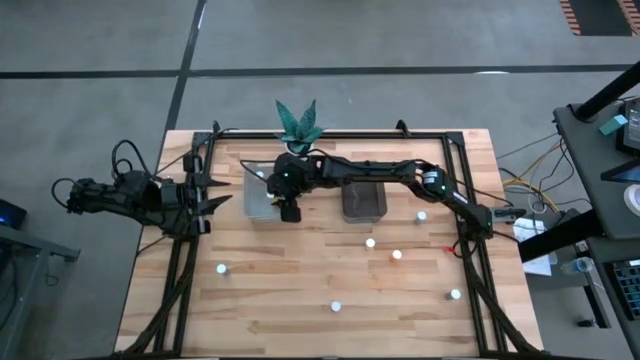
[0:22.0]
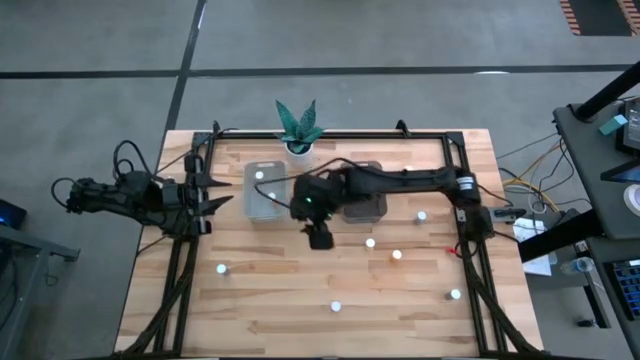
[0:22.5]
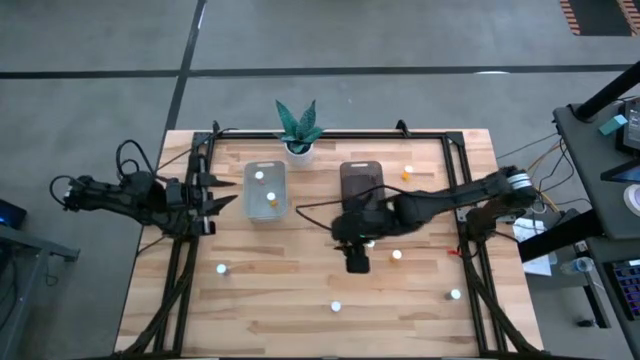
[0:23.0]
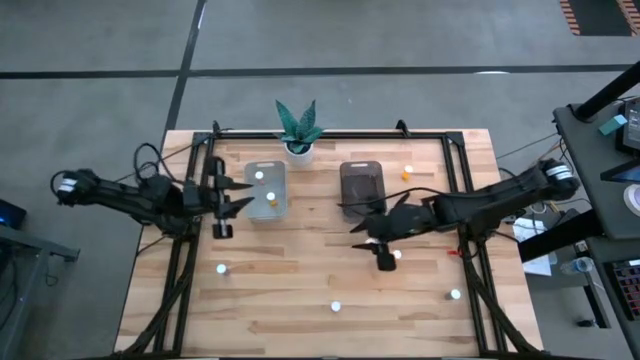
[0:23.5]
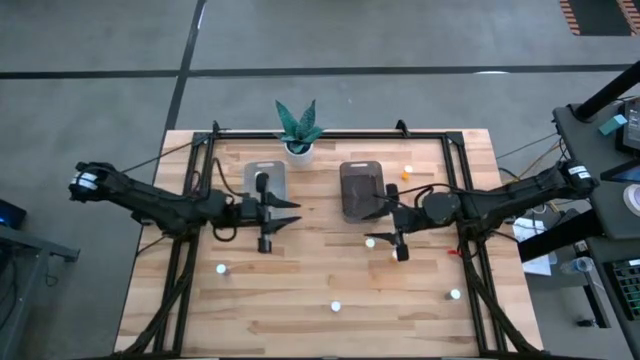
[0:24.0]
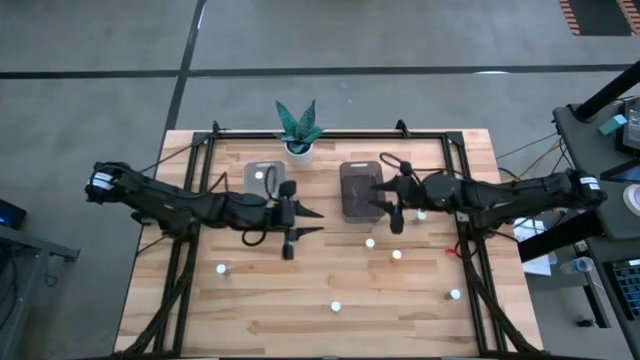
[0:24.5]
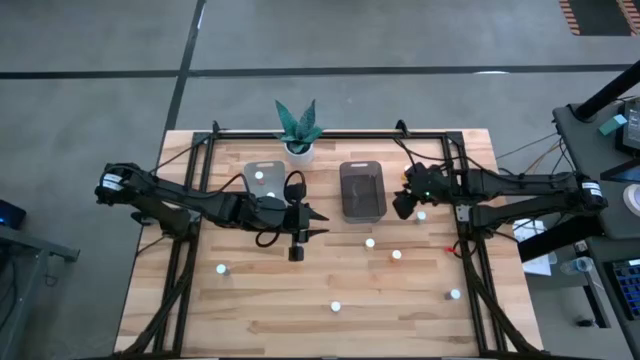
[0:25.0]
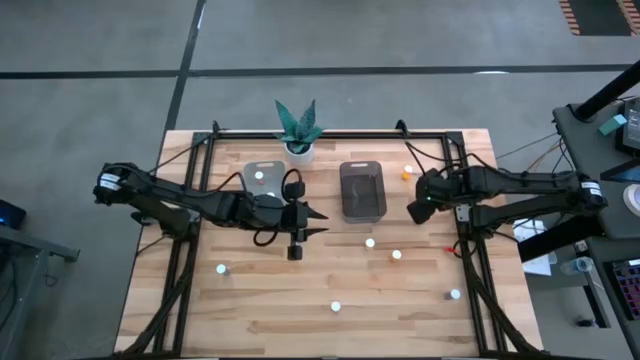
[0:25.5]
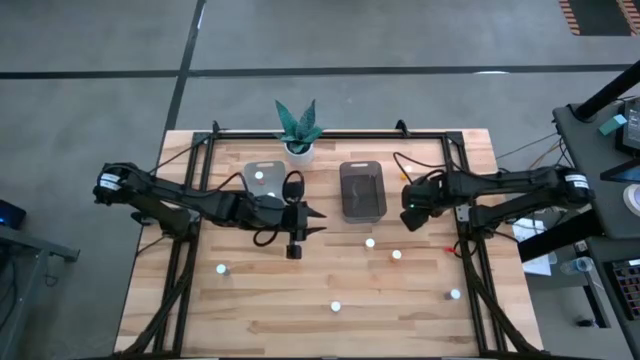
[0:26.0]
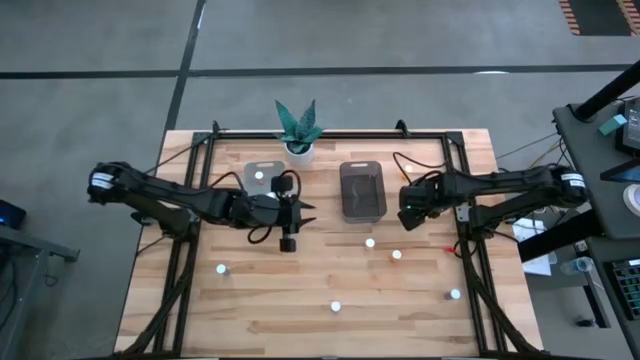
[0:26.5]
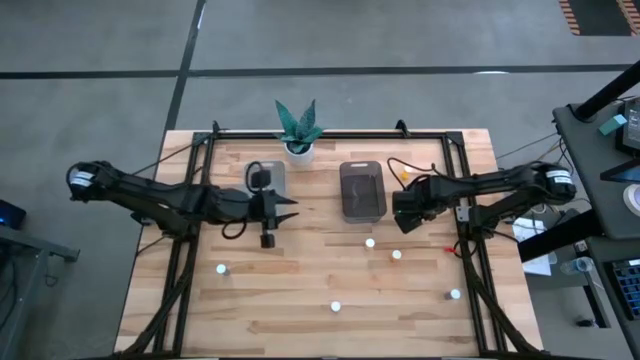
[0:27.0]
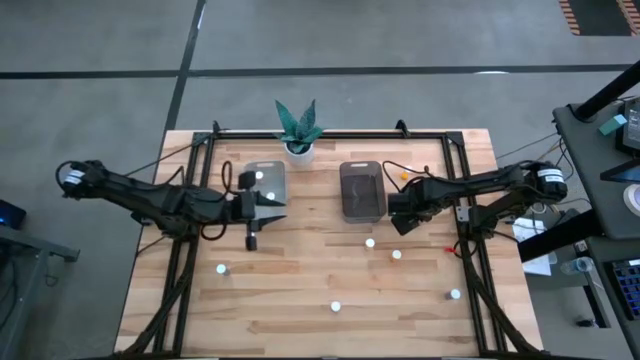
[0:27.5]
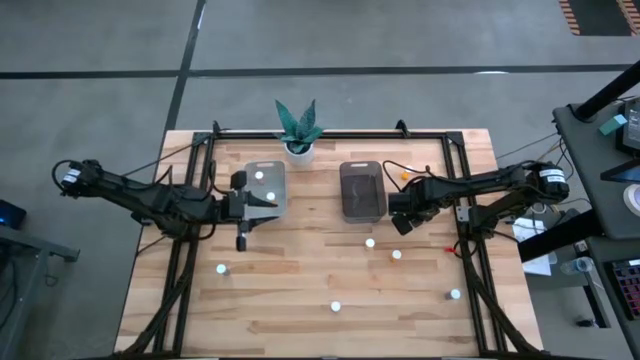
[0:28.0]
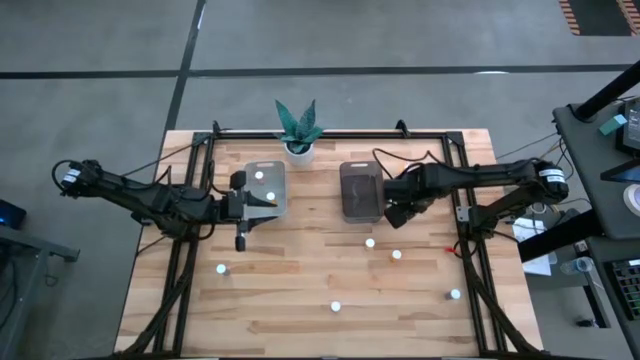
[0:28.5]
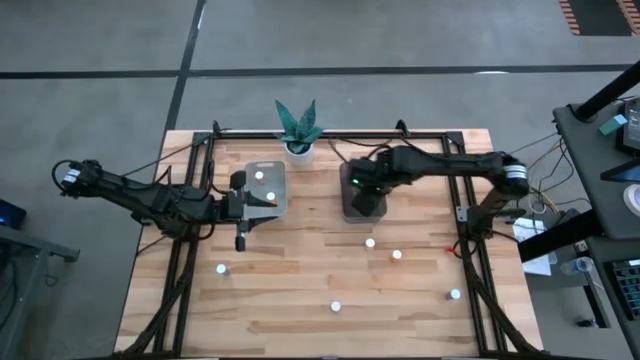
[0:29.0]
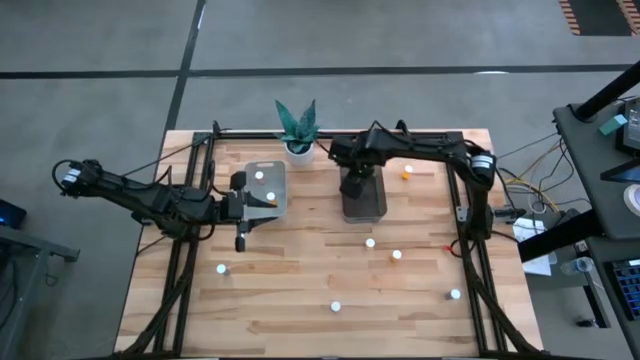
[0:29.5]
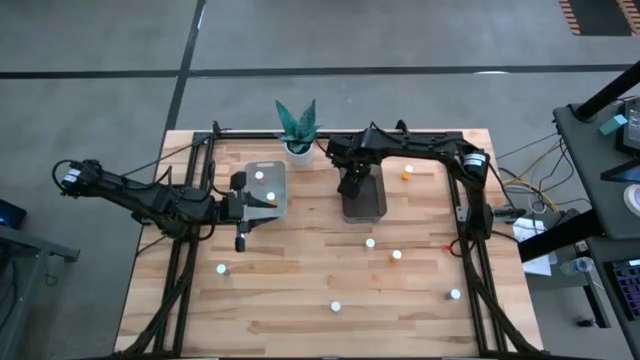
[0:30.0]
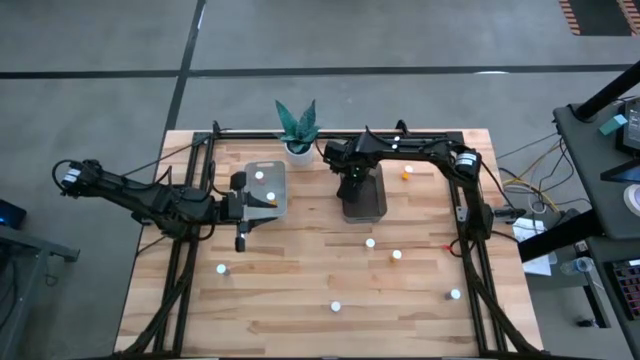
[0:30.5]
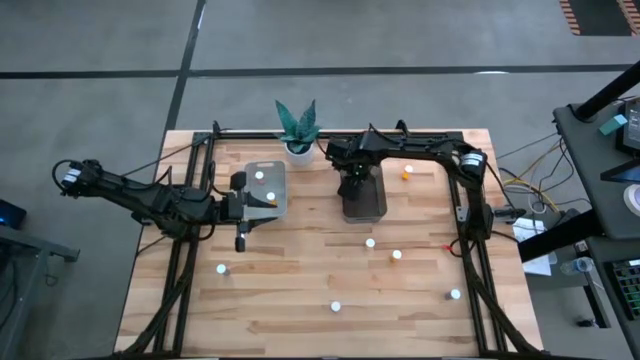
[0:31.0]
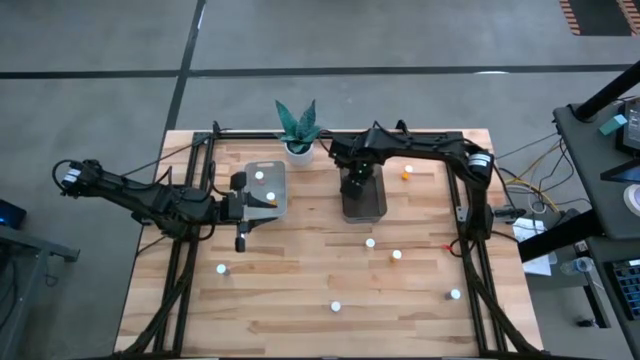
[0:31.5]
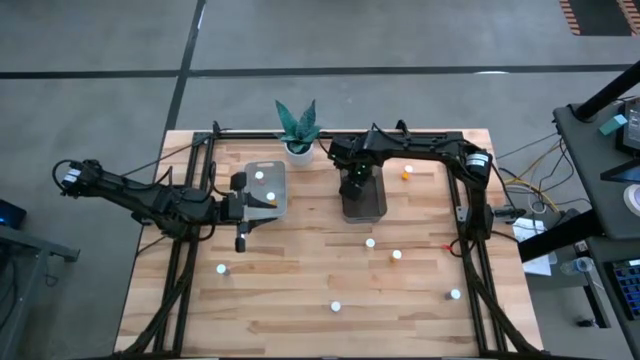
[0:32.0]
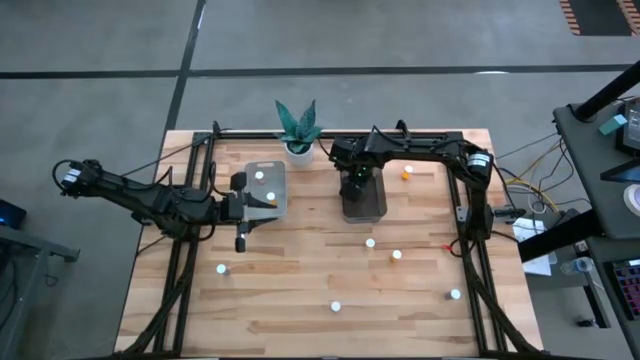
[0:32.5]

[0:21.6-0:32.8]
Task: Pick and place medicine bottles into bin by pill shape (circle, oval)
Put the top blue capsule bottle into the black bin

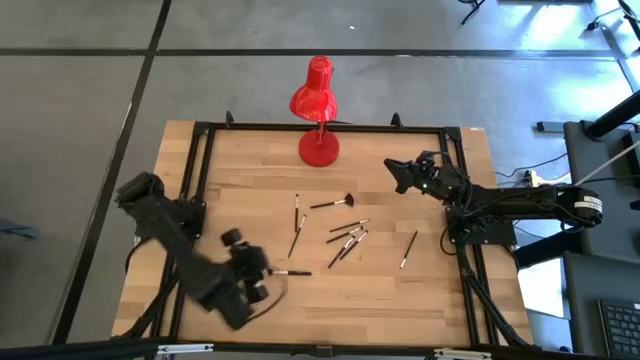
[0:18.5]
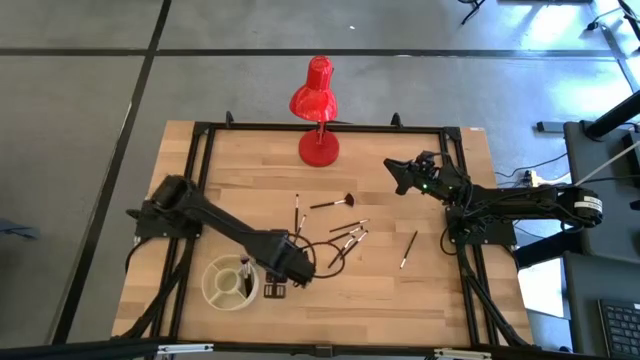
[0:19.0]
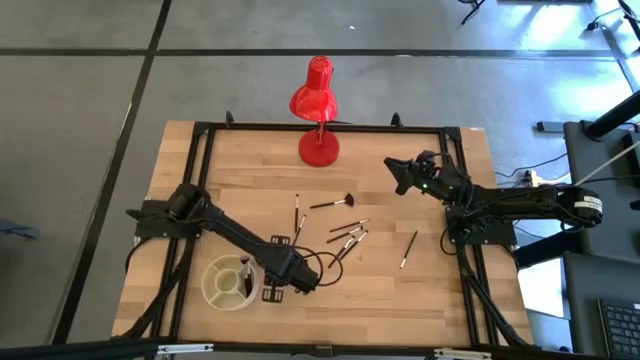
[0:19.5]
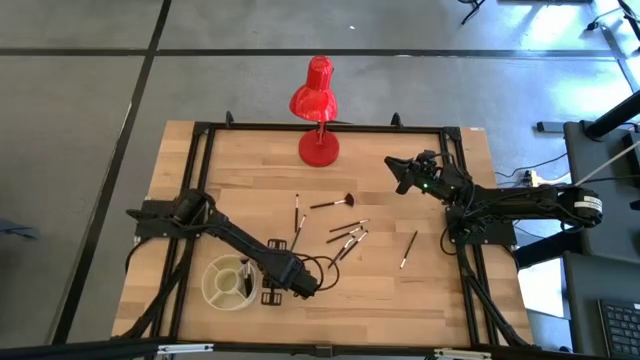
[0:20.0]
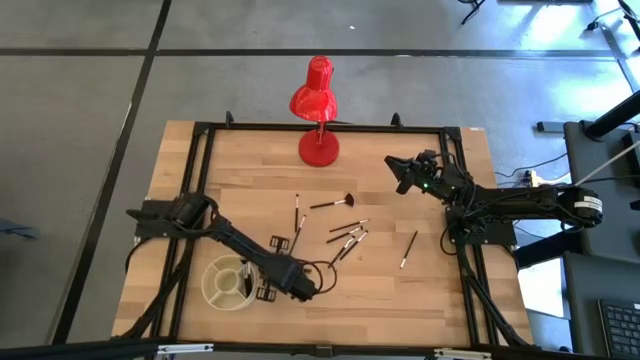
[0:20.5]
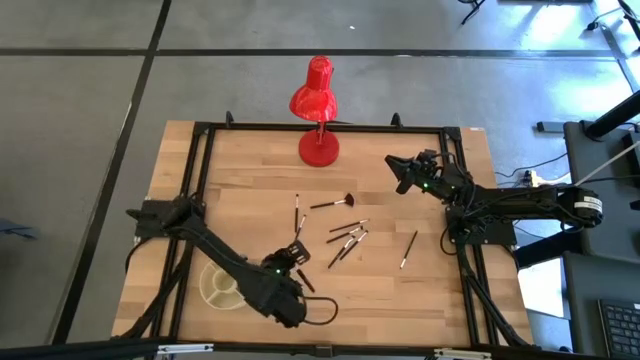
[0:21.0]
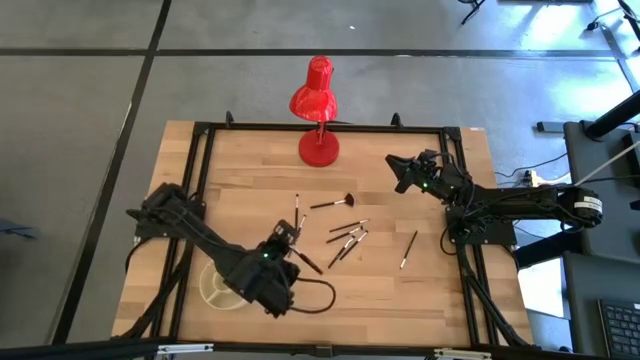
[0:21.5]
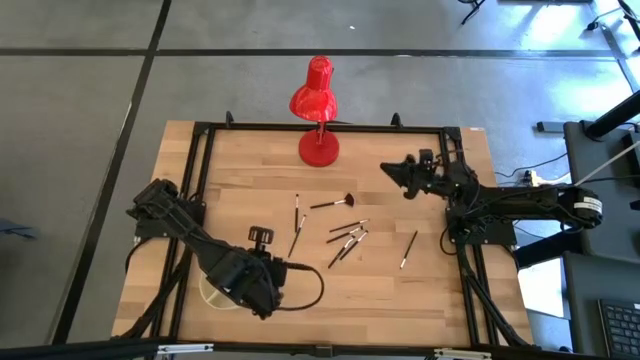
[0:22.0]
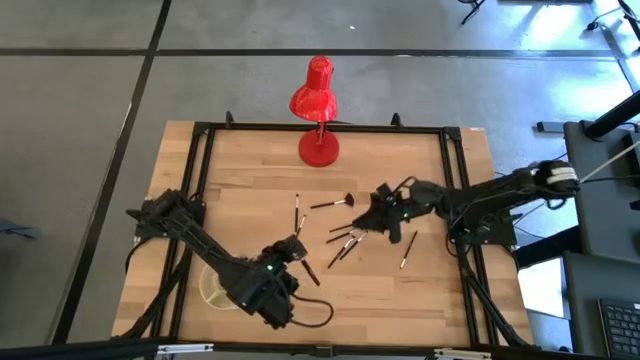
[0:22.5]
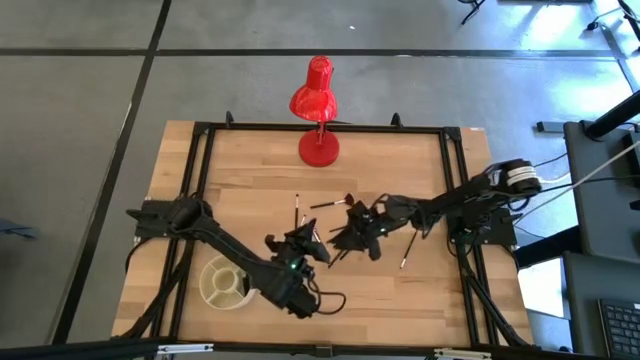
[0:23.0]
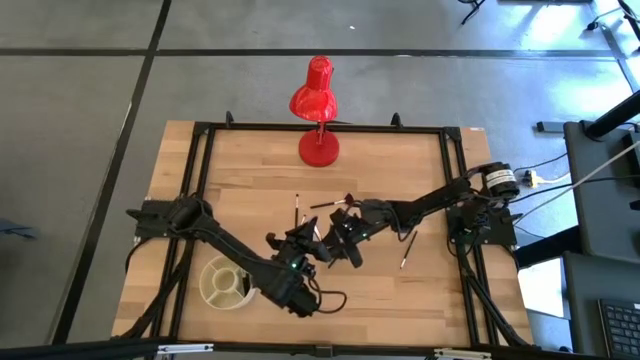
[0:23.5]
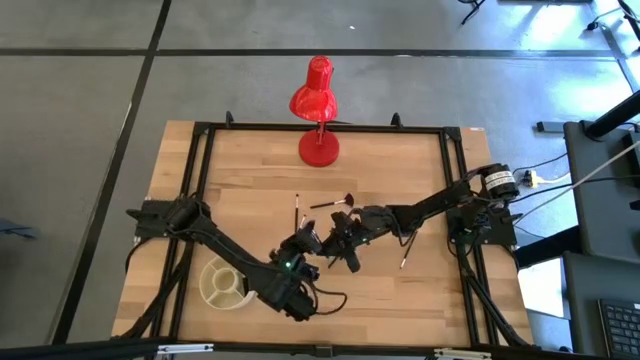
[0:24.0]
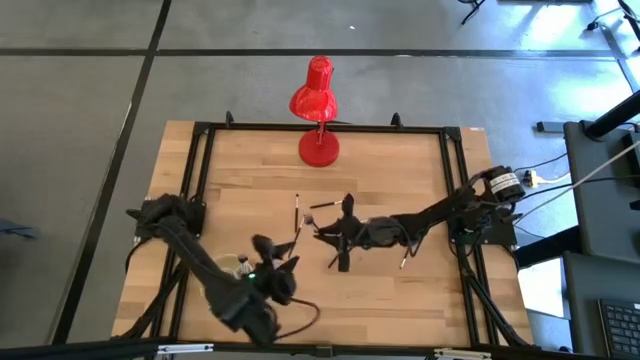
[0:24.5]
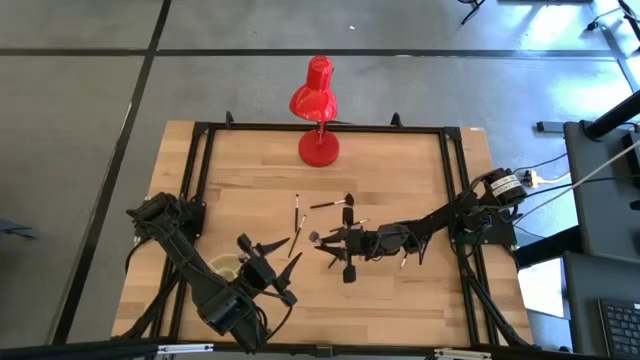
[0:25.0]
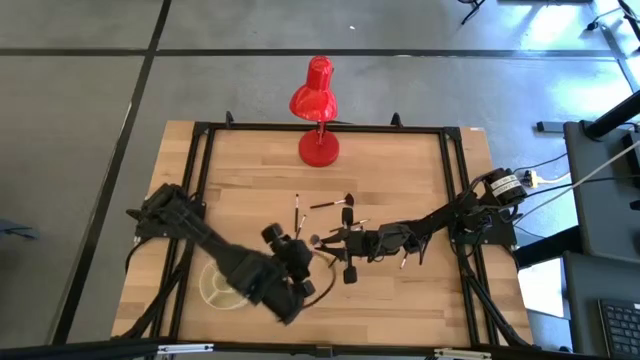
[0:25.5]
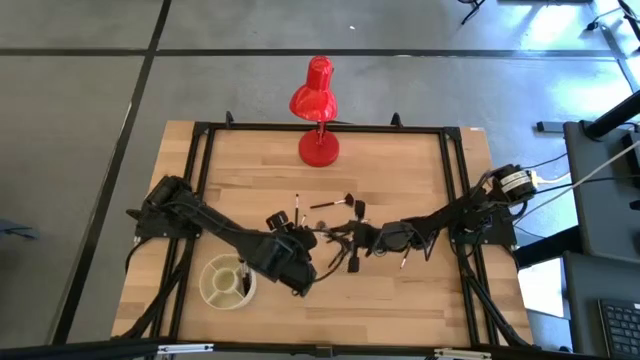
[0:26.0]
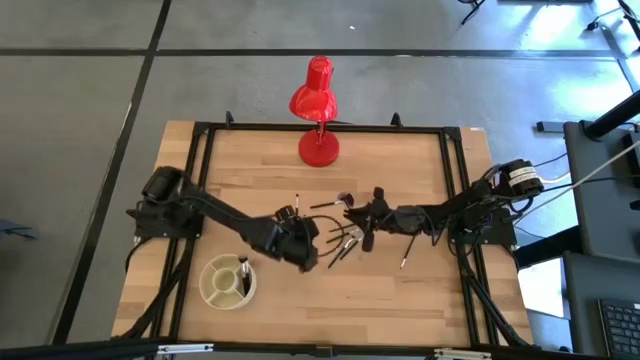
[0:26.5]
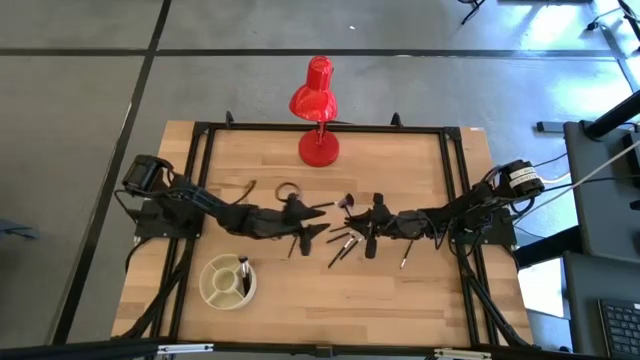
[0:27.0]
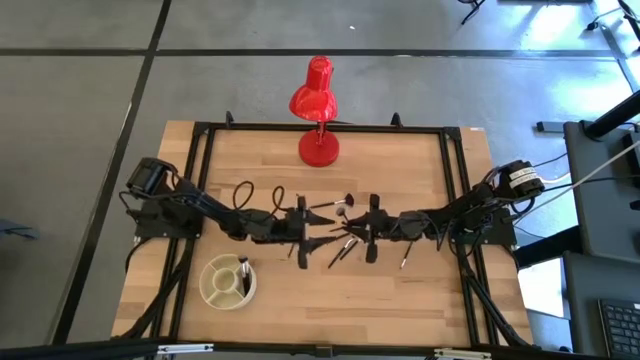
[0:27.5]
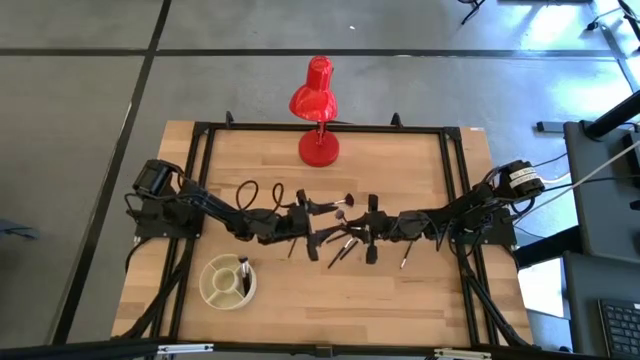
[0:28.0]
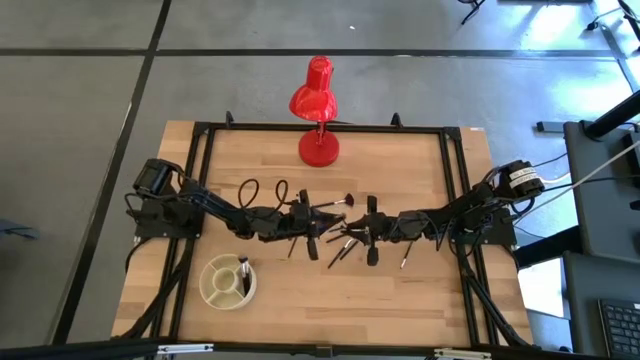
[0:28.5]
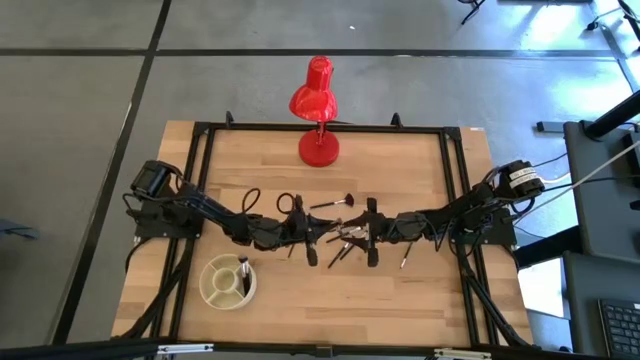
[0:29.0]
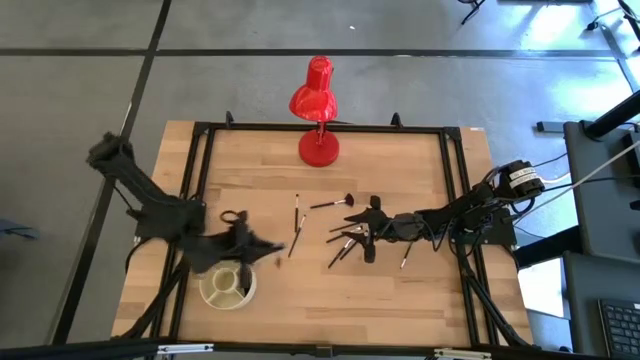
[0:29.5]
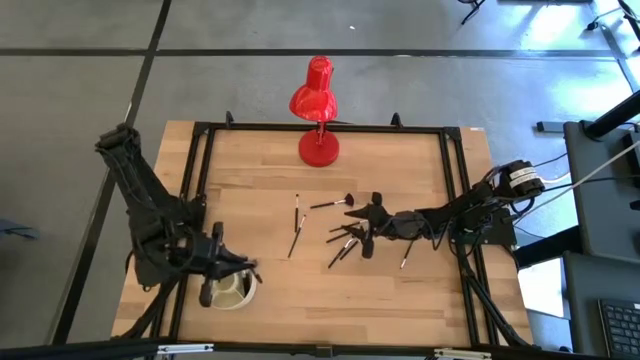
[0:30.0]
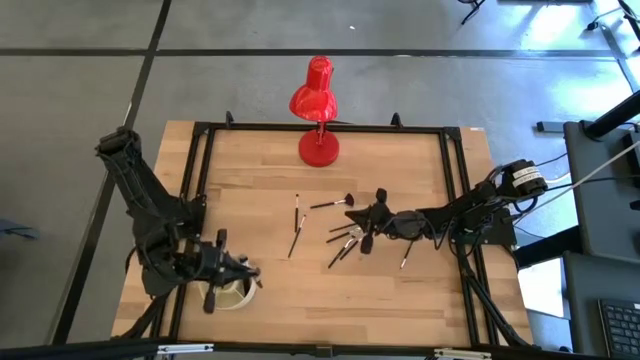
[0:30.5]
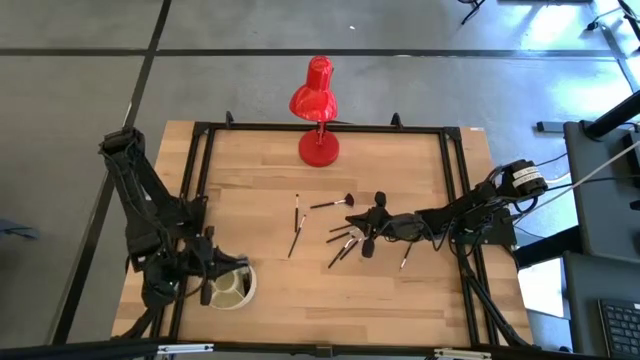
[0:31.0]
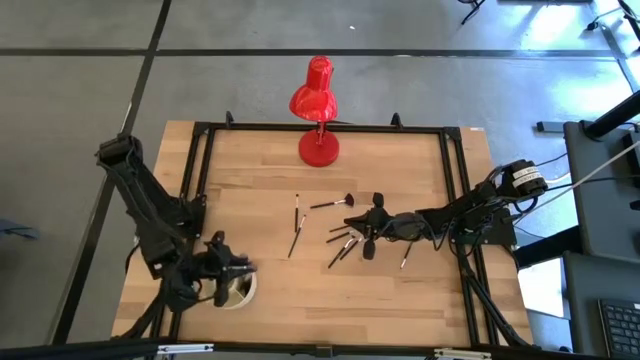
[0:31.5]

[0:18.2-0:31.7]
Task: Put items in baskets/containers
Put the powder brush into the pen organizer
